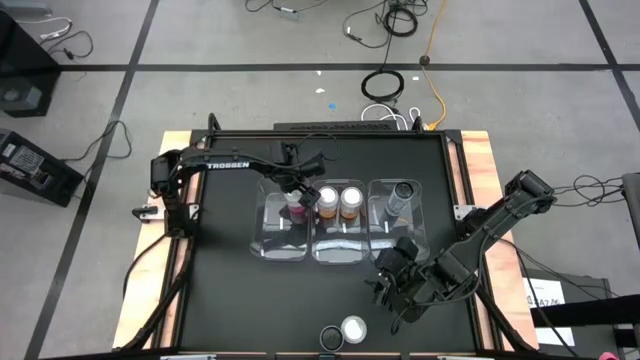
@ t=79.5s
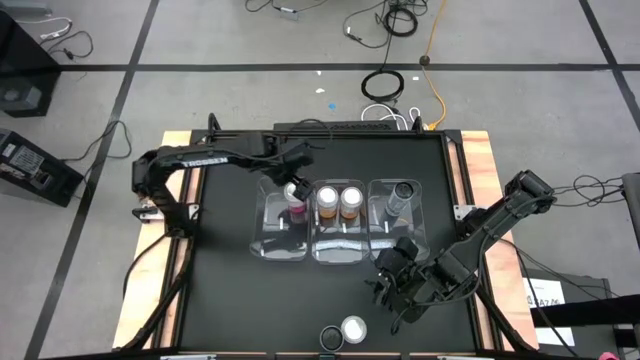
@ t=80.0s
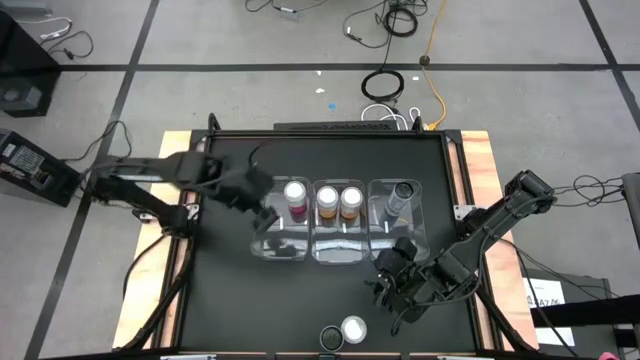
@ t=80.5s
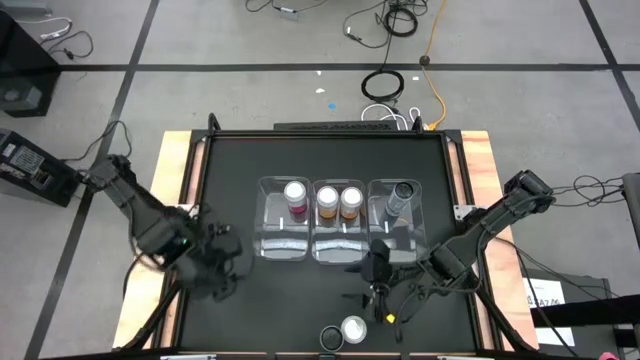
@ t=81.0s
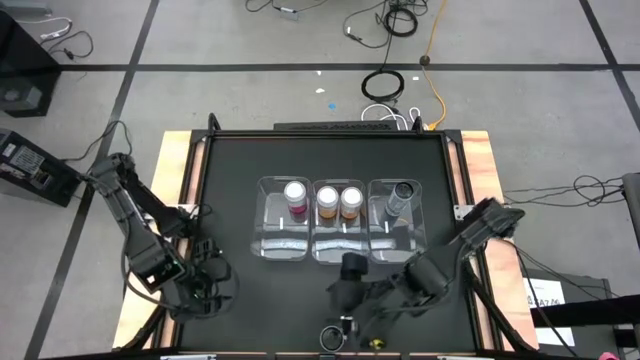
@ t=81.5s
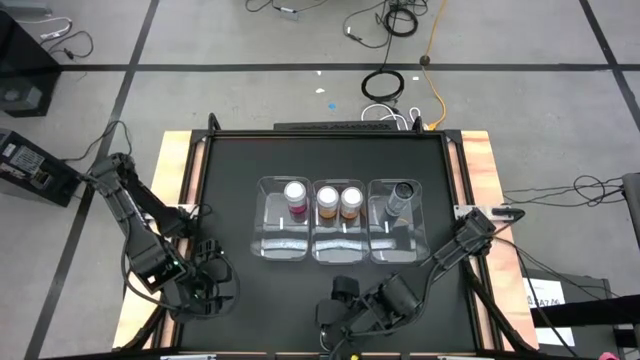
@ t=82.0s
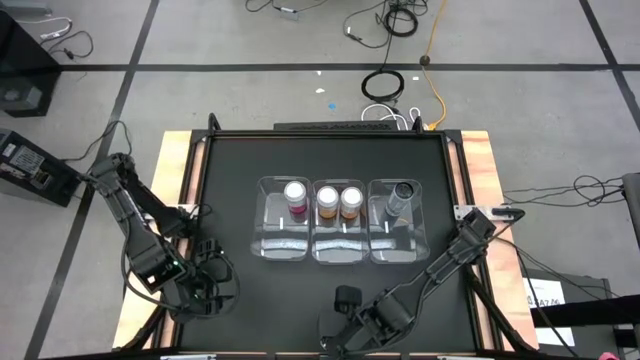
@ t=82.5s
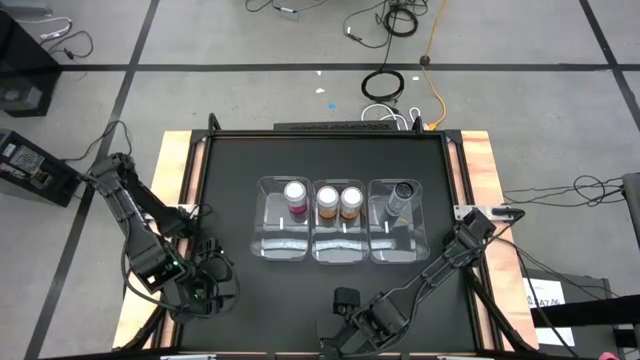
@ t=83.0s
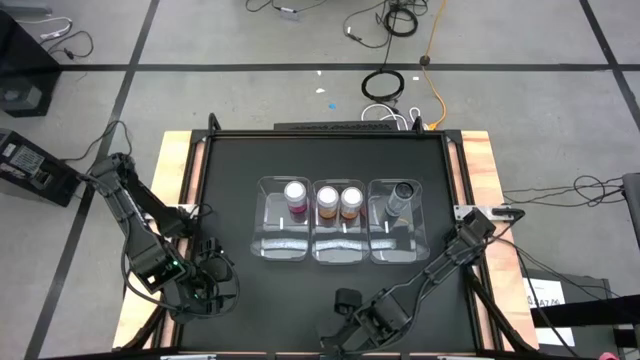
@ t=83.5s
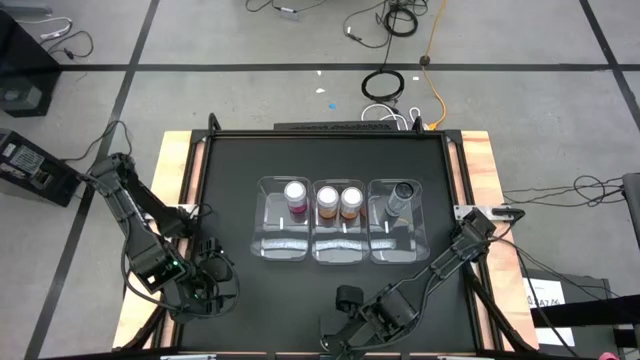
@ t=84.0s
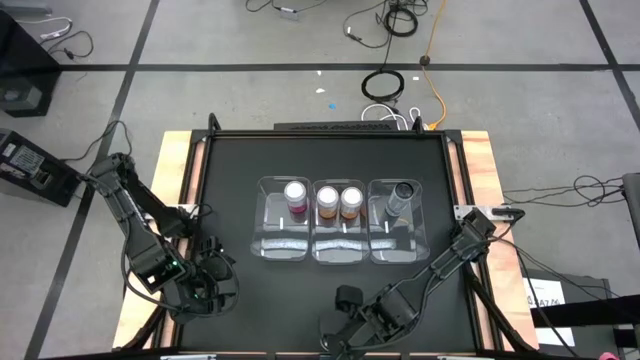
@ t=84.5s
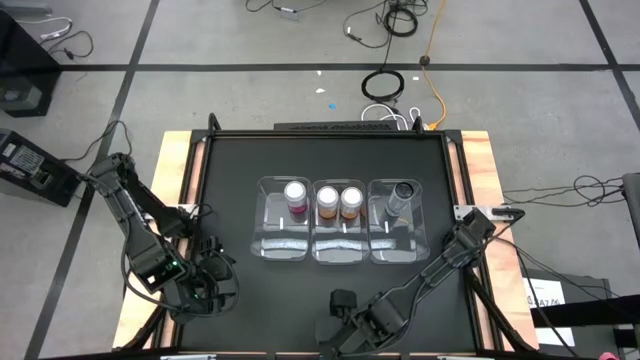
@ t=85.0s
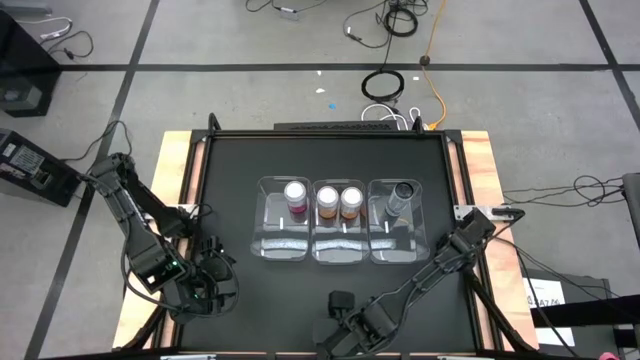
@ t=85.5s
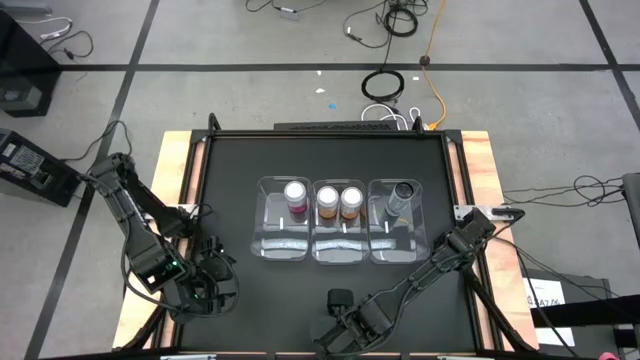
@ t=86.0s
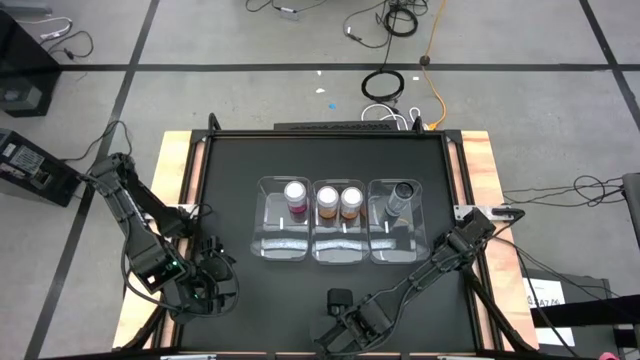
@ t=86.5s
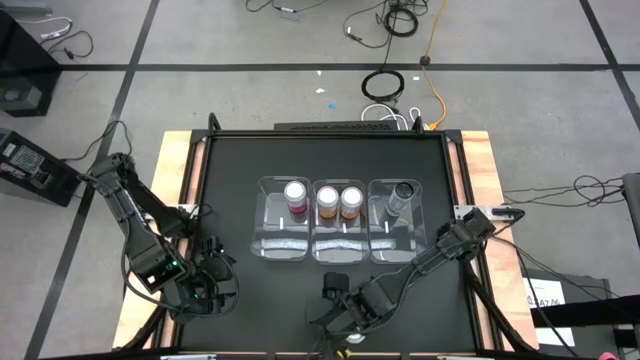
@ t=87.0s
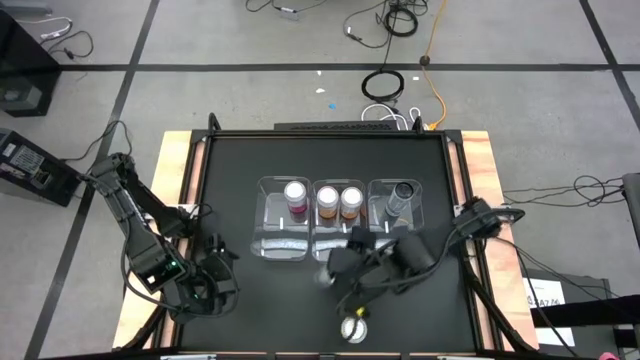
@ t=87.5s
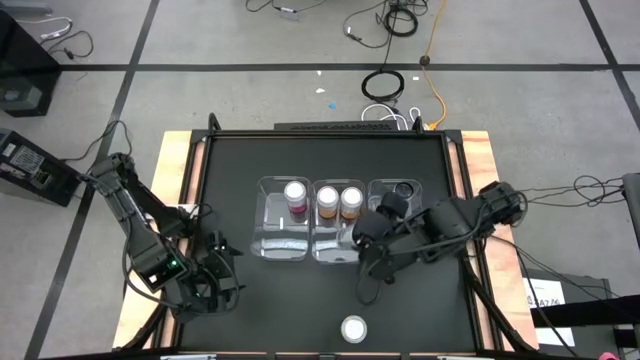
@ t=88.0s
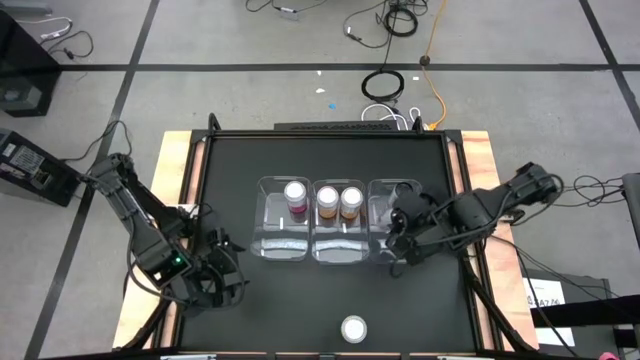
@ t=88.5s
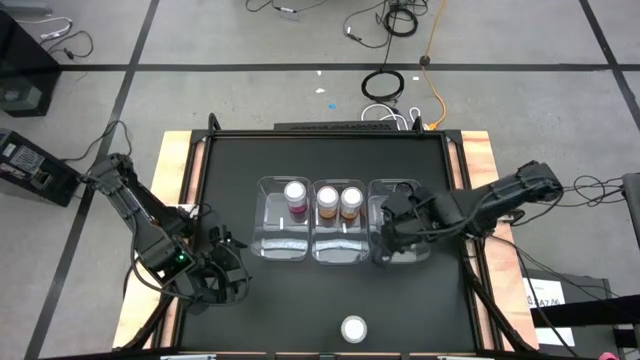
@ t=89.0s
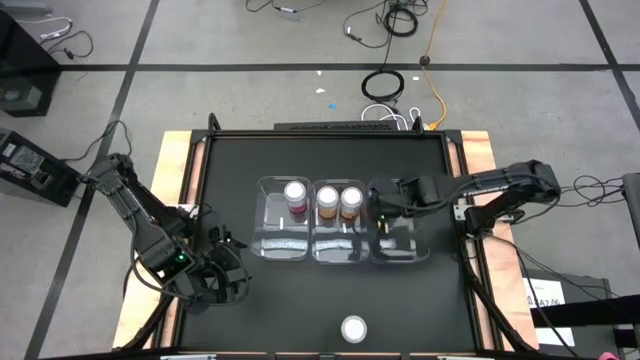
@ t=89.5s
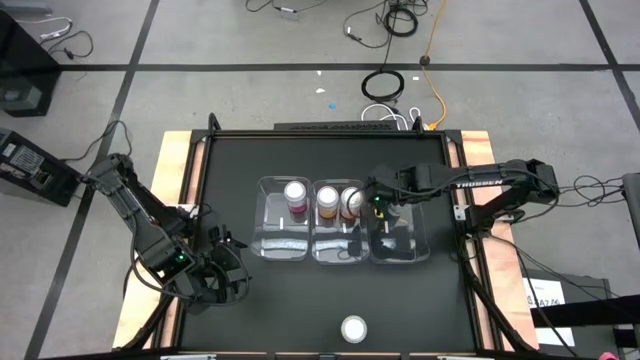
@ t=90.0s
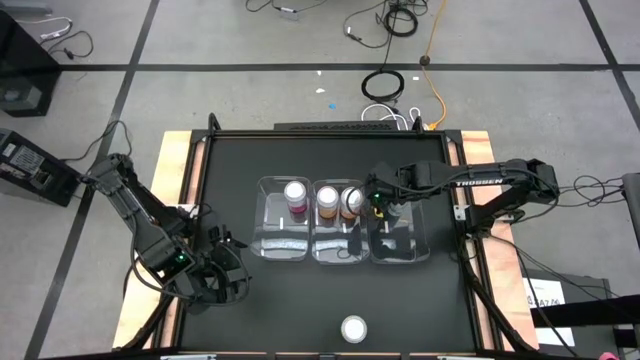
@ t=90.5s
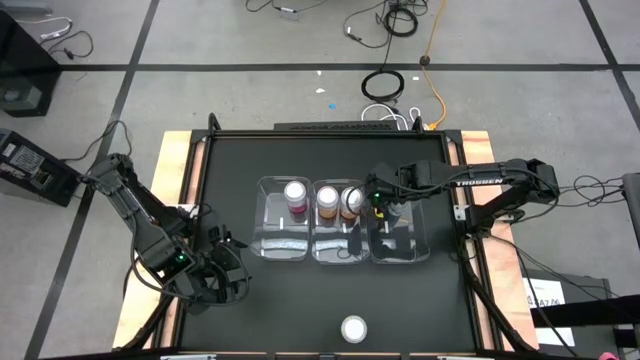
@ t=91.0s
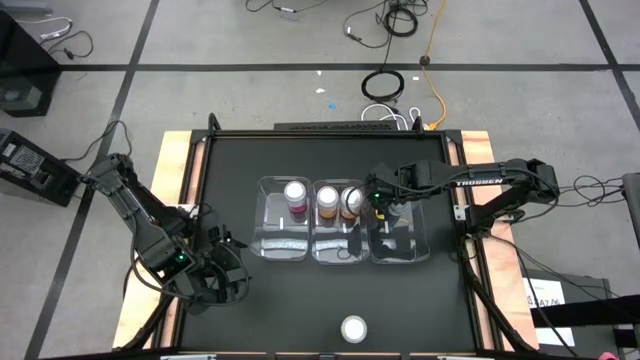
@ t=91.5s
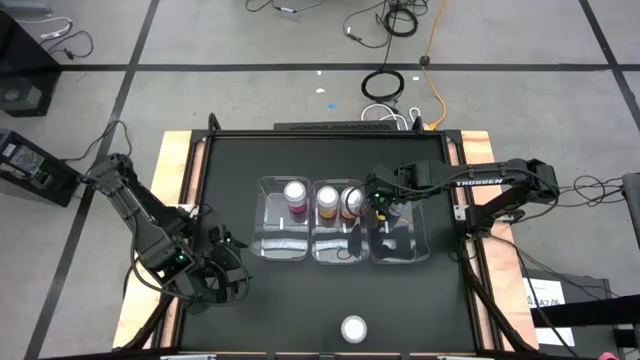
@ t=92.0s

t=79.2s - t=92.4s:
Task: Sort soda cans
Put the white blue soda can into the right transparent bin

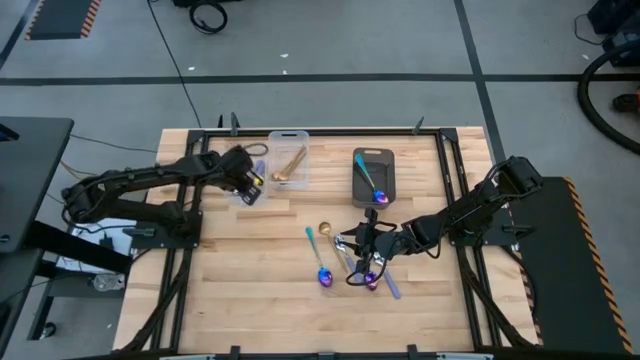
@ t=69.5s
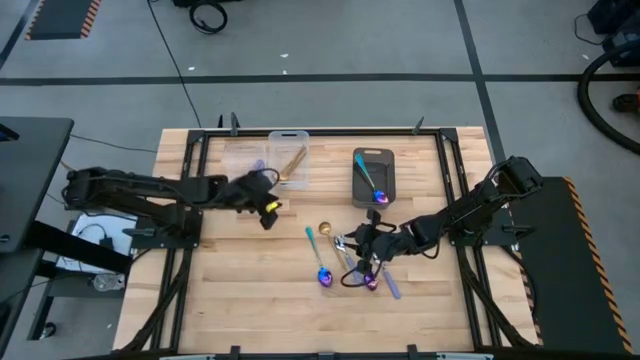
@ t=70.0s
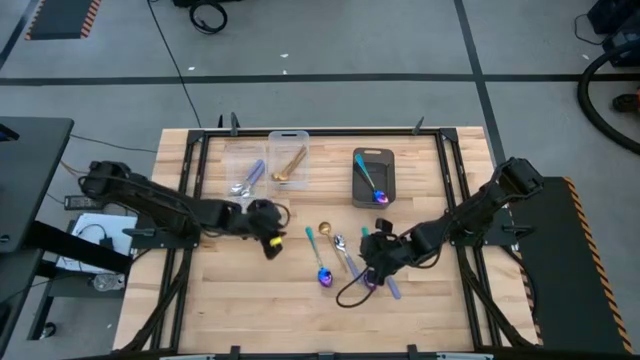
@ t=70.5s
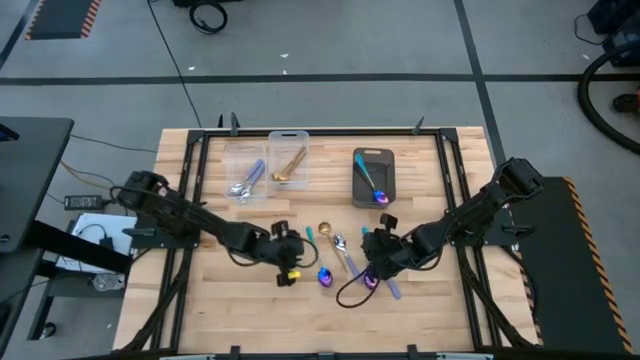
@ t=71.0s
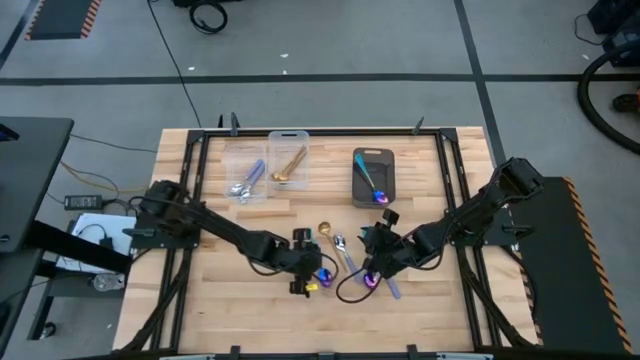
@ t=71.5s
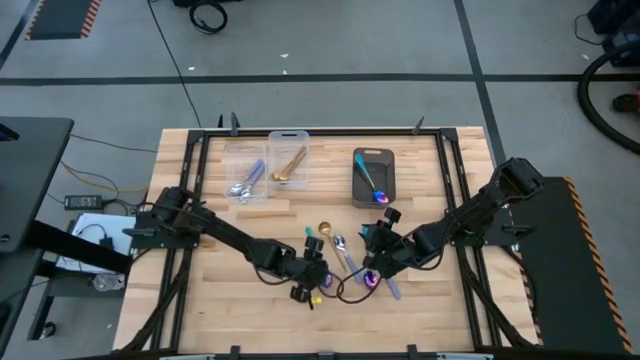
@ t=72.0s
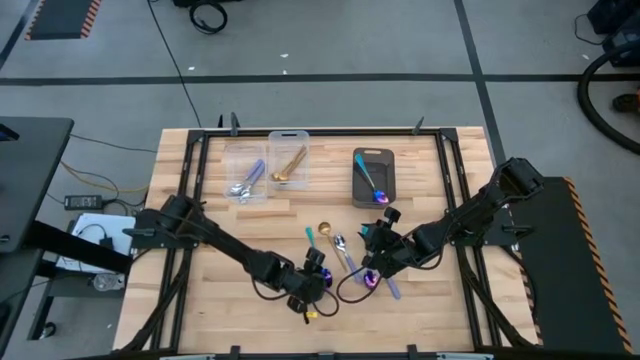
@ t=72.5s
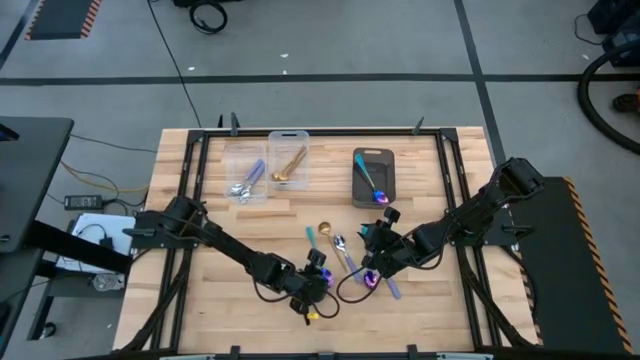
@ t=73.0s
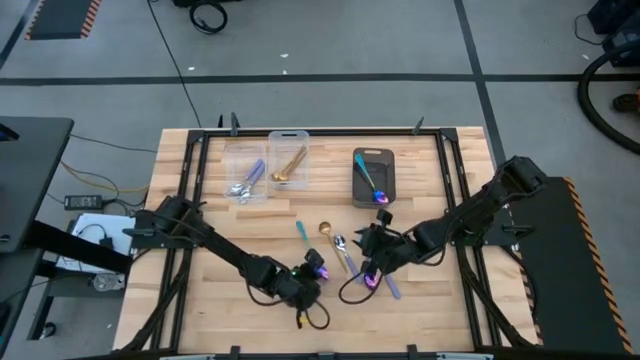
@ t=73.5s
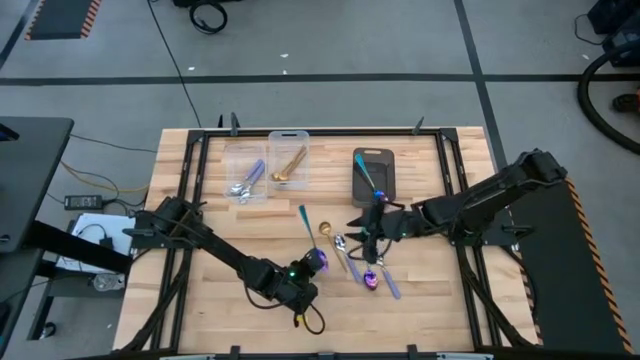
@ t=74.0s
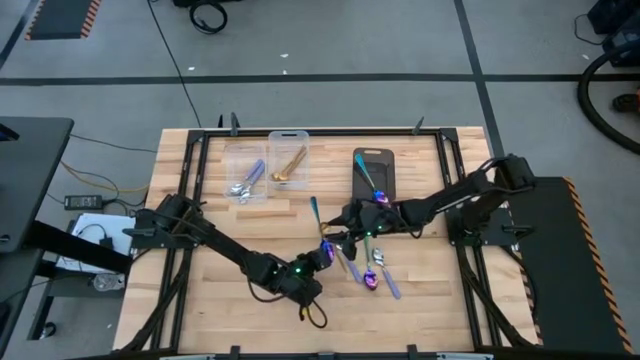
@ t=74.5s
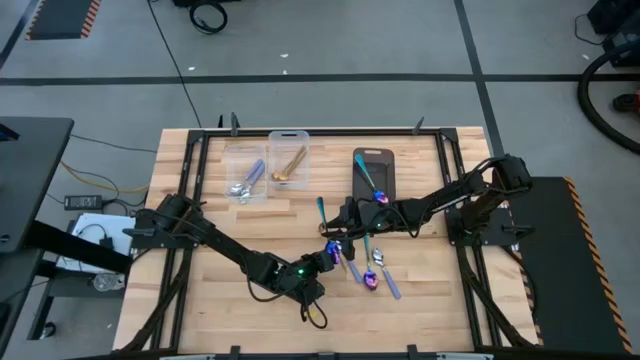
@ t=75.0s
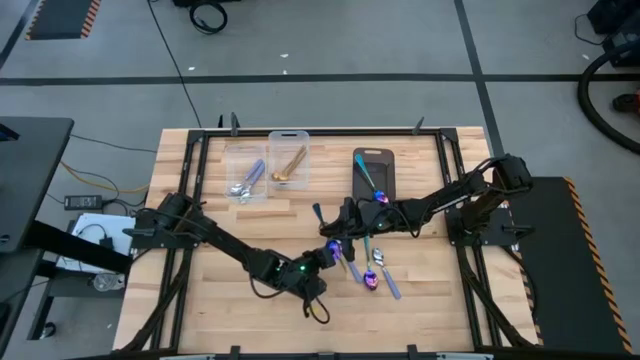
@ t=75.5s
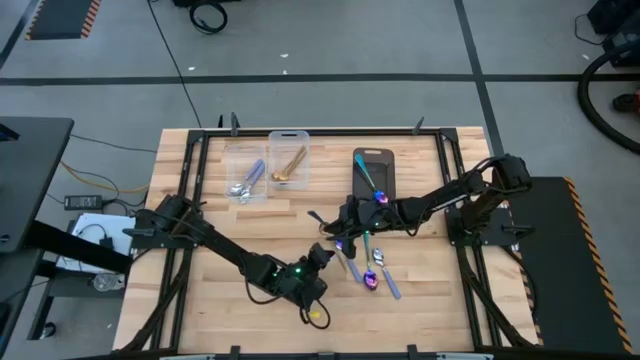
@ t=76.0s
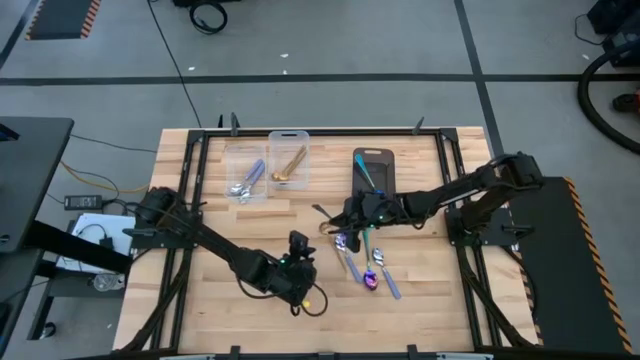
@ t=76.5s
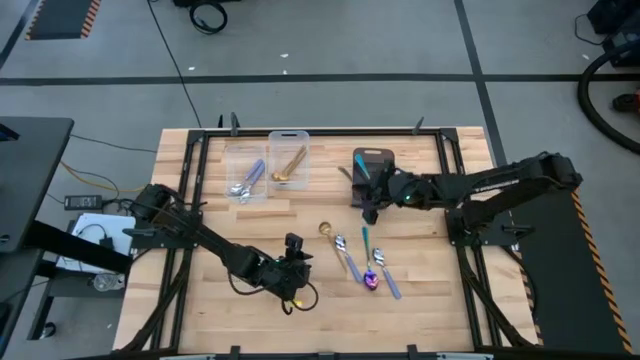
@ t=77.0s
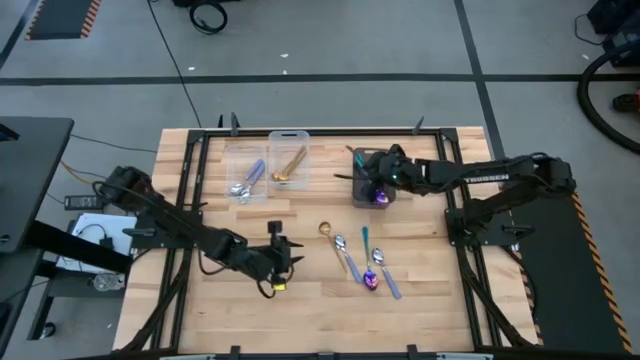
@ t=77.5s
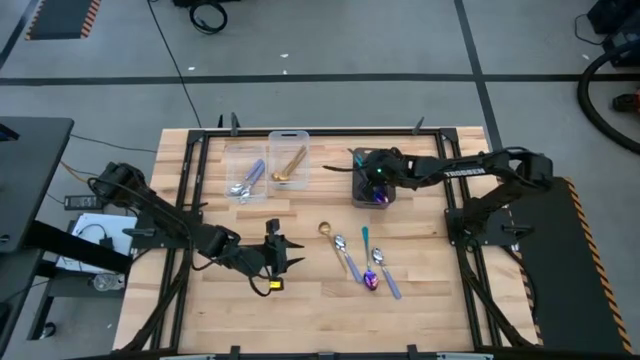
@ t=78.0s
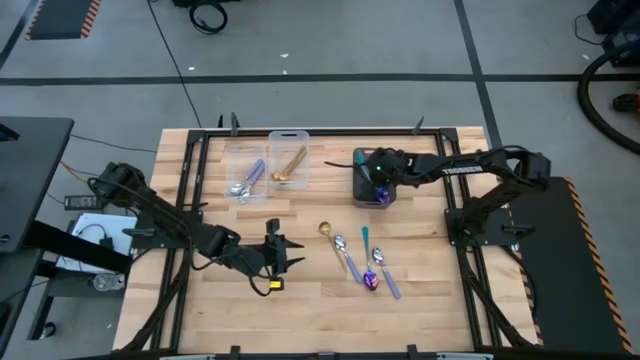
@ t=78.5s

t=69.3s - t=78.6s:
Task: Sort silverware by color (type)
Put the blue spoon into the black bin
